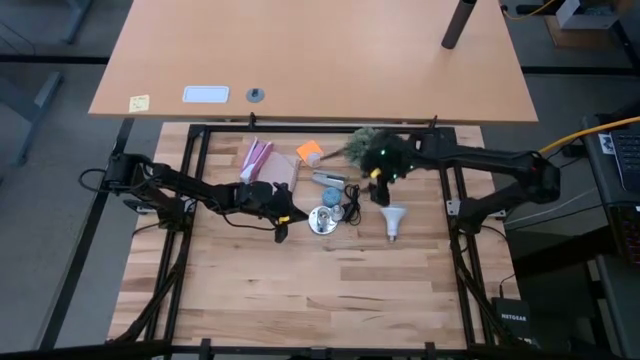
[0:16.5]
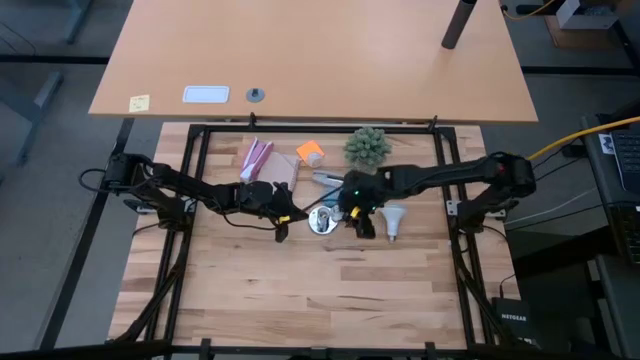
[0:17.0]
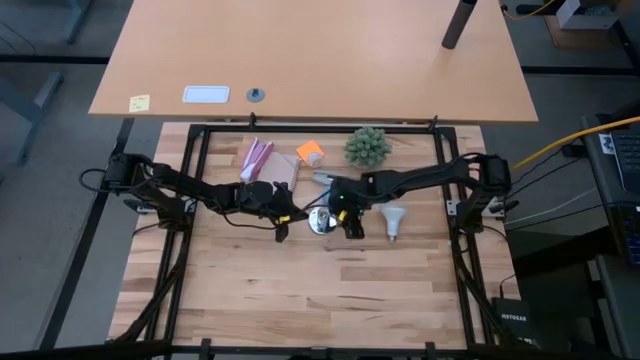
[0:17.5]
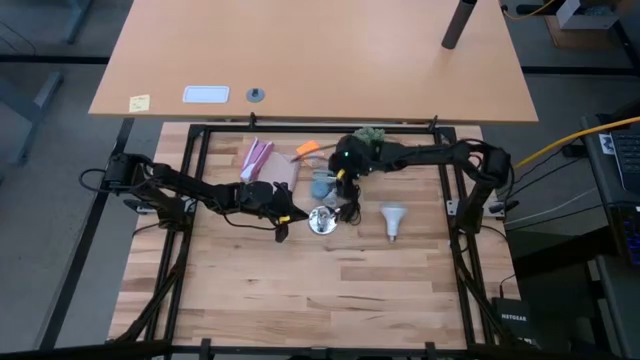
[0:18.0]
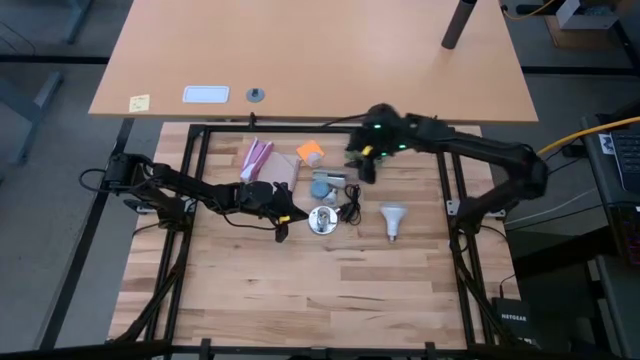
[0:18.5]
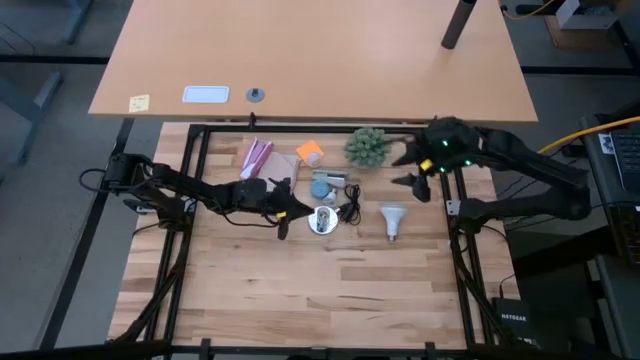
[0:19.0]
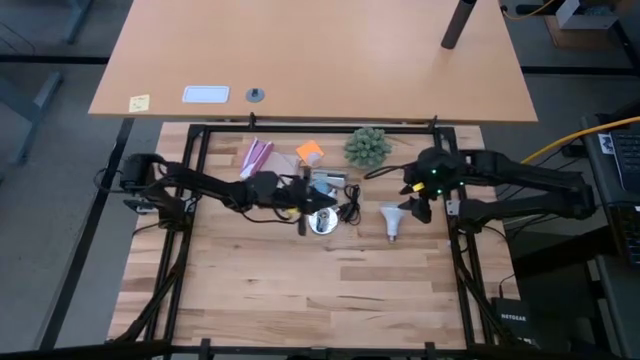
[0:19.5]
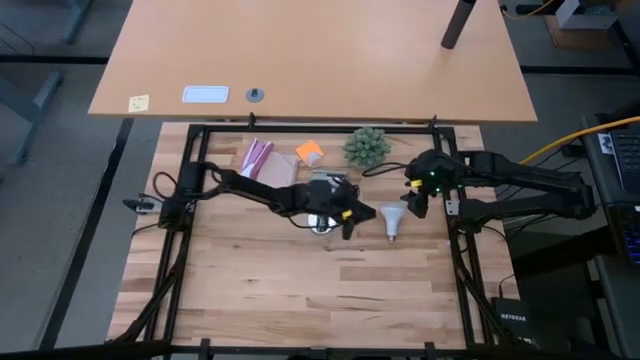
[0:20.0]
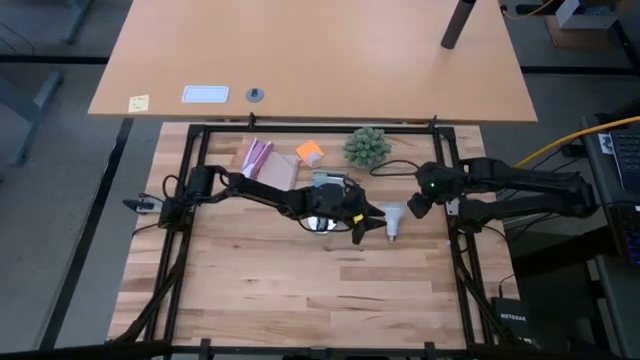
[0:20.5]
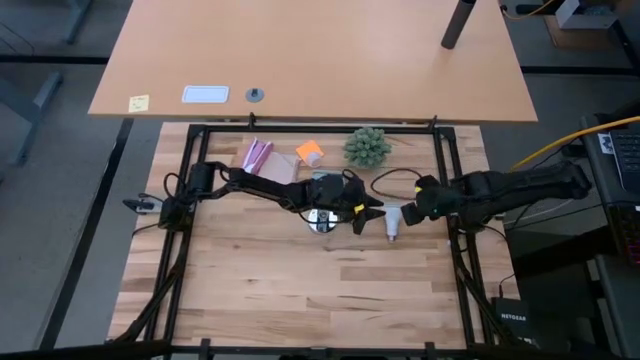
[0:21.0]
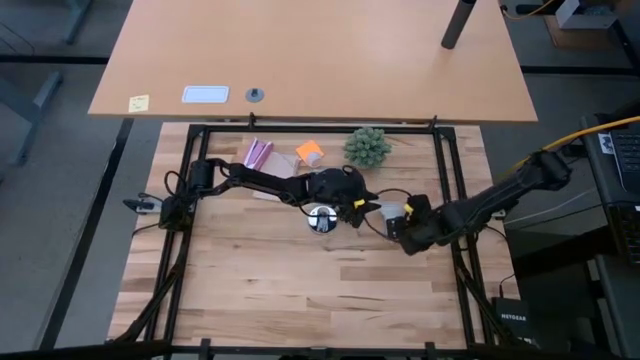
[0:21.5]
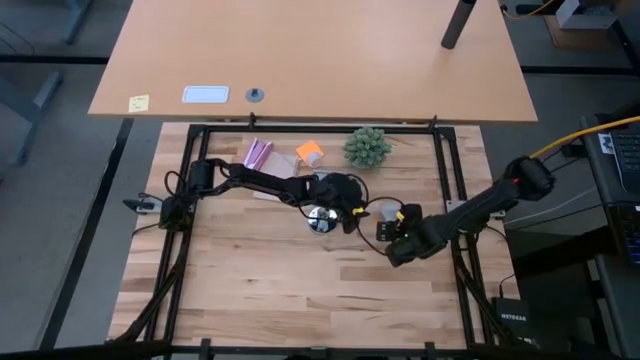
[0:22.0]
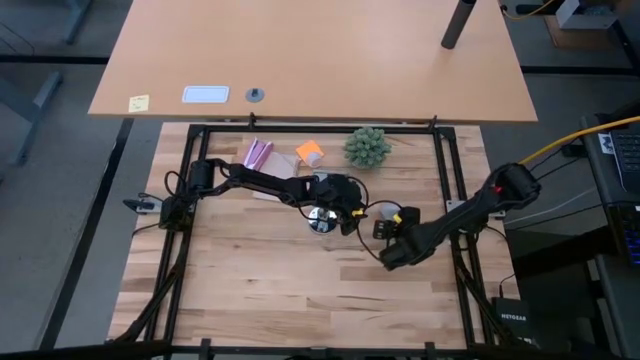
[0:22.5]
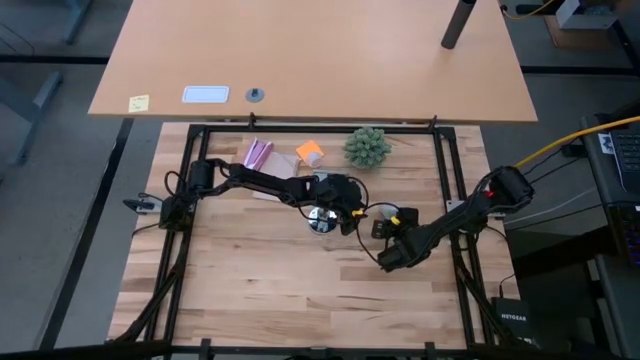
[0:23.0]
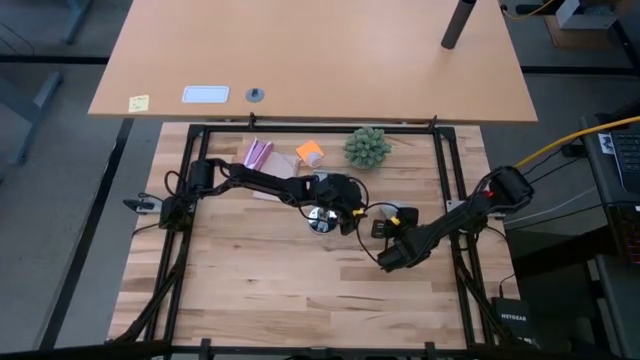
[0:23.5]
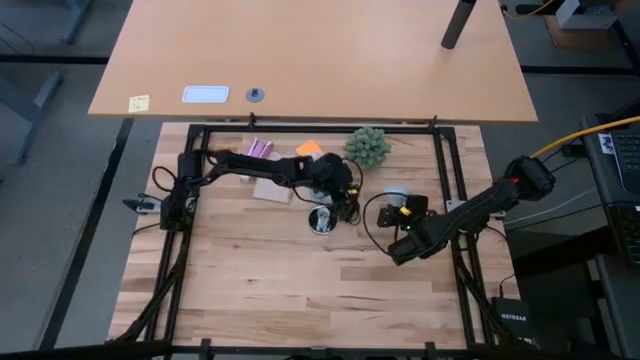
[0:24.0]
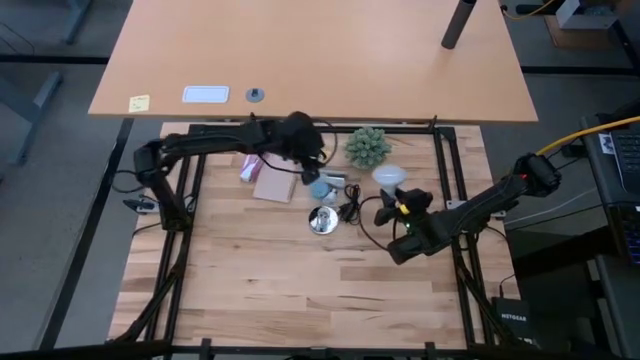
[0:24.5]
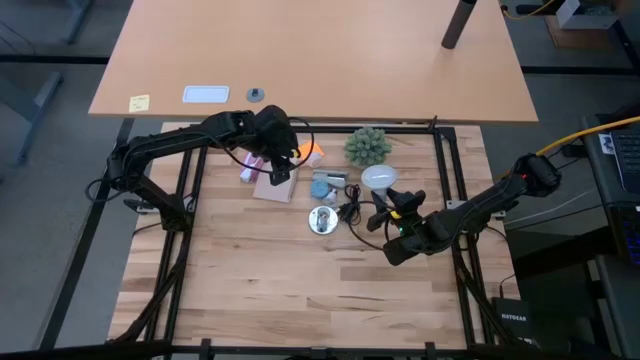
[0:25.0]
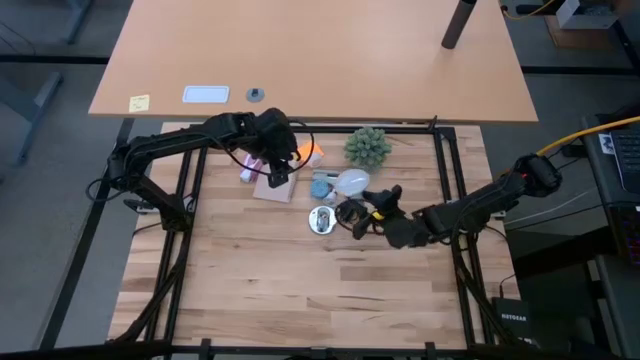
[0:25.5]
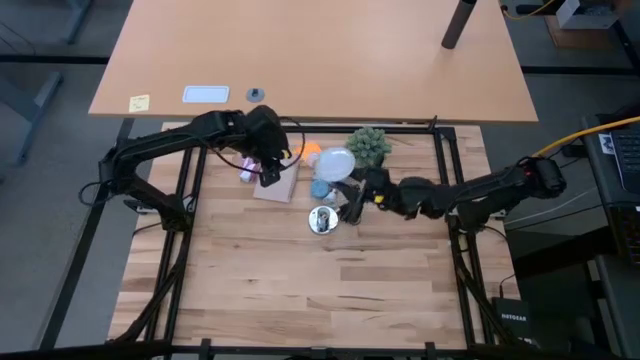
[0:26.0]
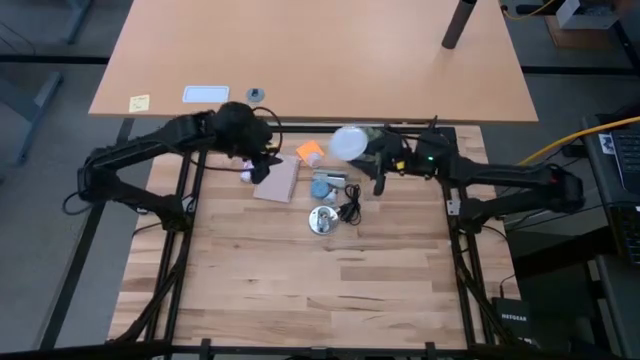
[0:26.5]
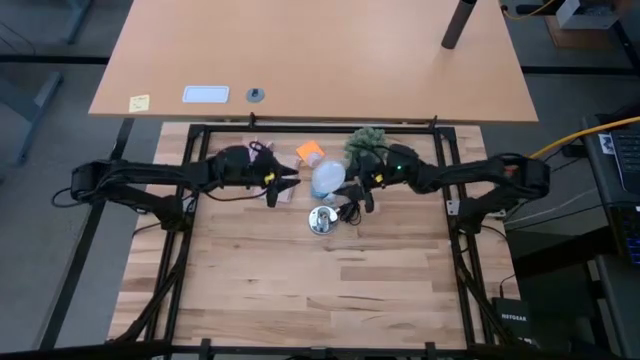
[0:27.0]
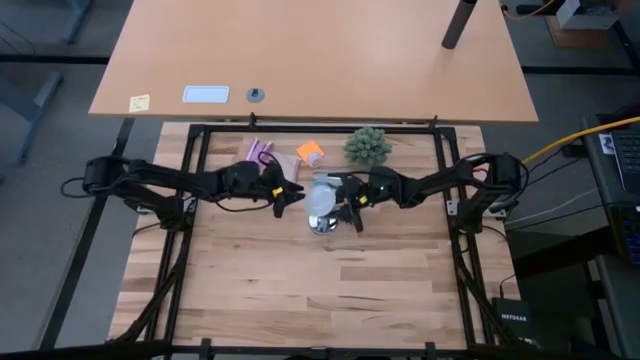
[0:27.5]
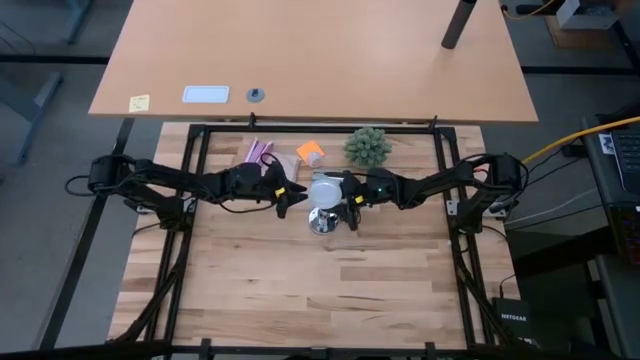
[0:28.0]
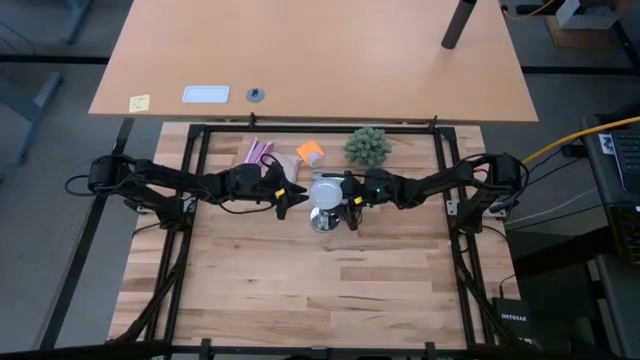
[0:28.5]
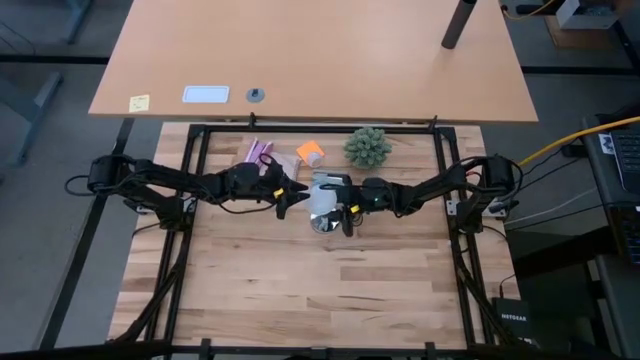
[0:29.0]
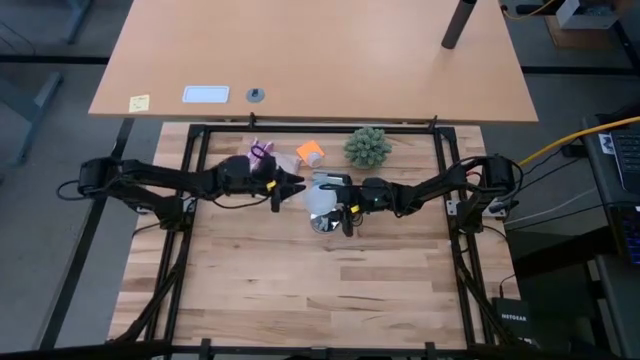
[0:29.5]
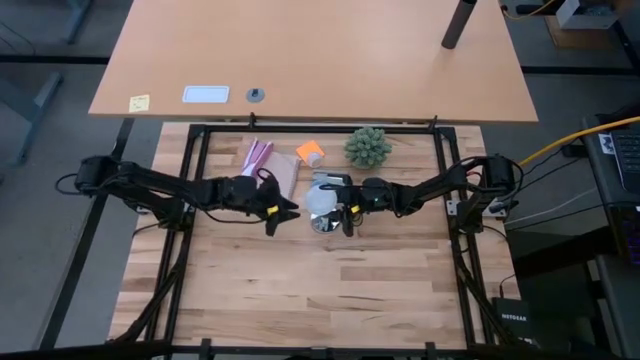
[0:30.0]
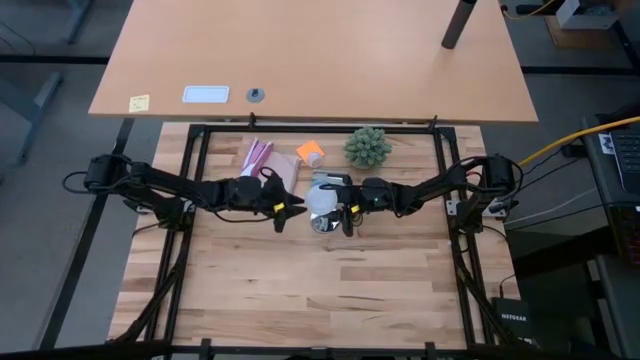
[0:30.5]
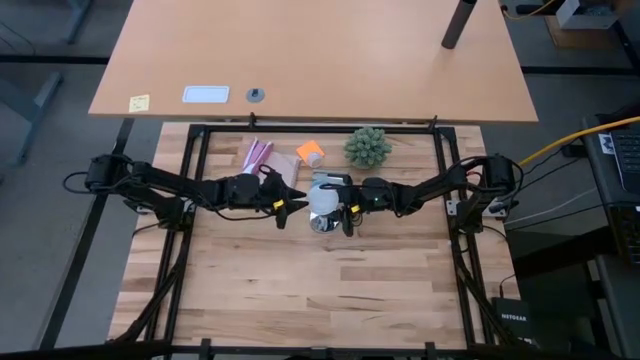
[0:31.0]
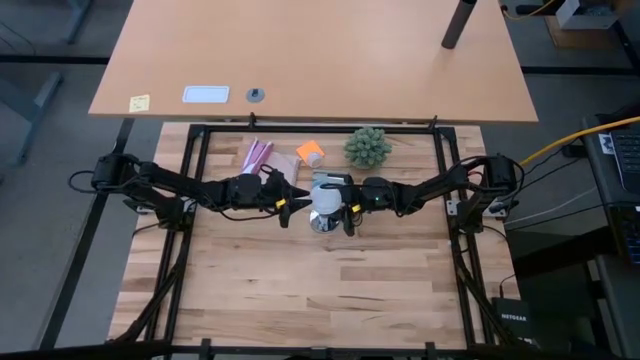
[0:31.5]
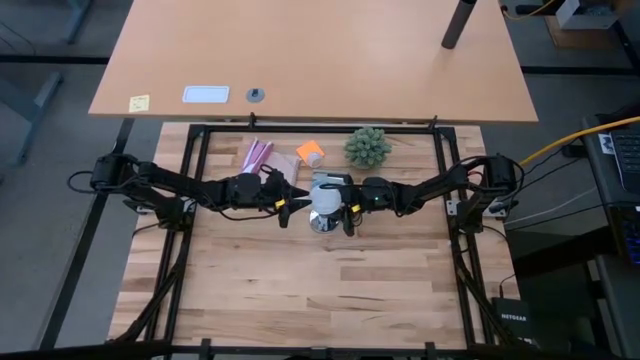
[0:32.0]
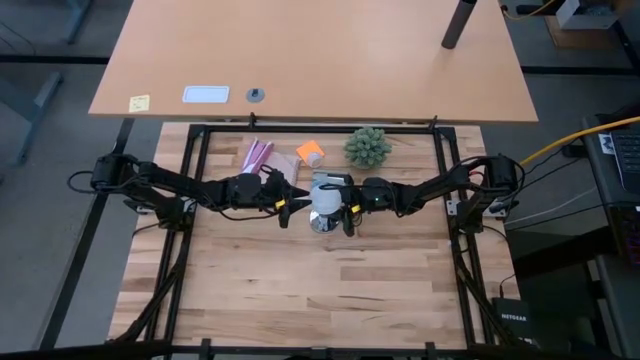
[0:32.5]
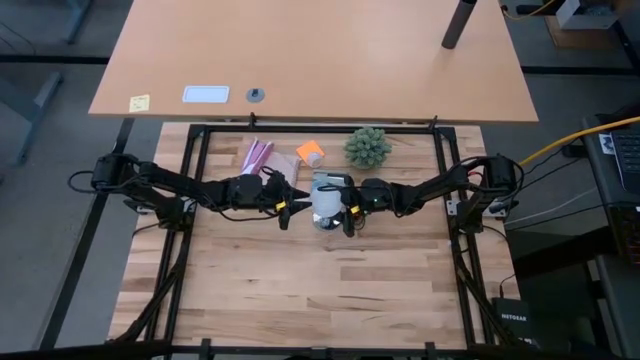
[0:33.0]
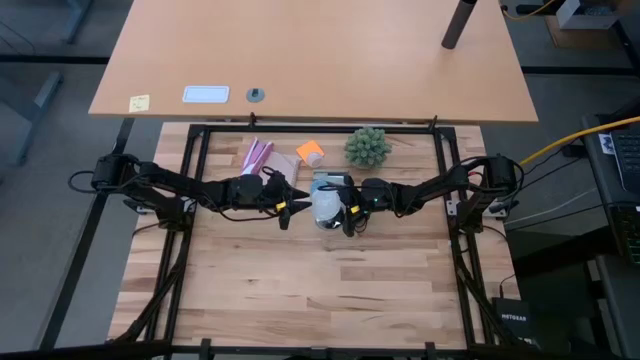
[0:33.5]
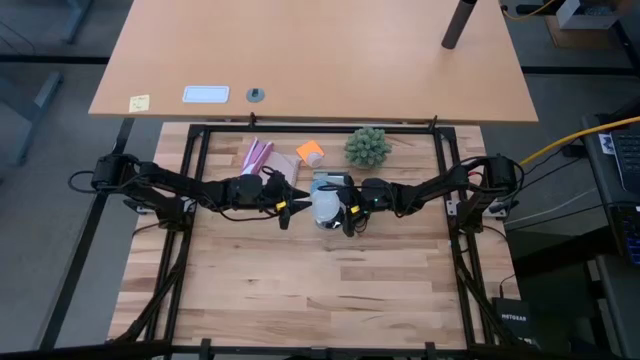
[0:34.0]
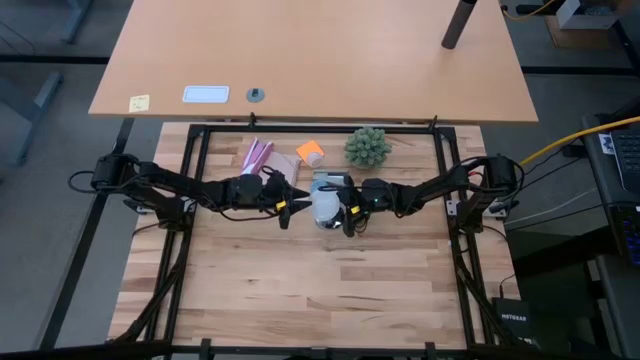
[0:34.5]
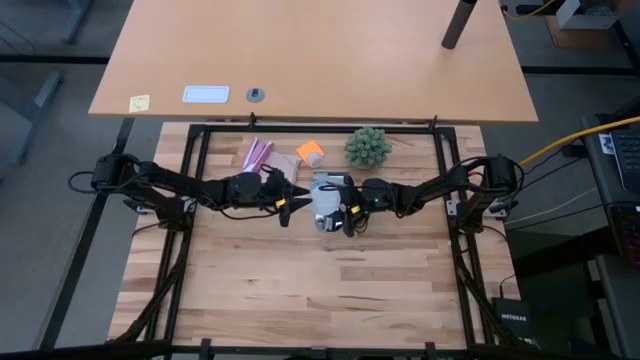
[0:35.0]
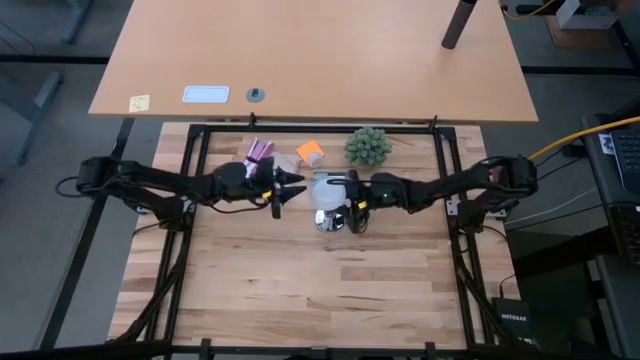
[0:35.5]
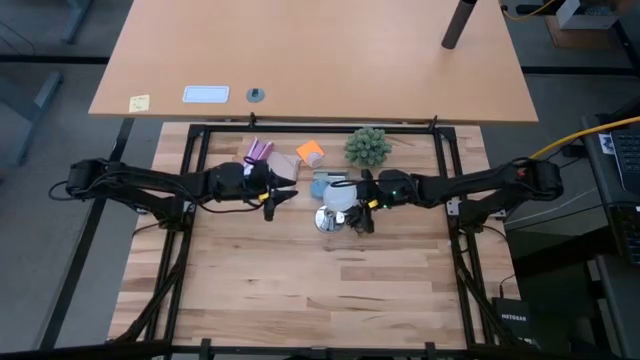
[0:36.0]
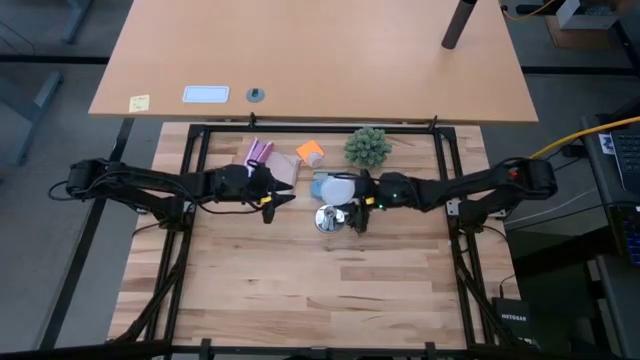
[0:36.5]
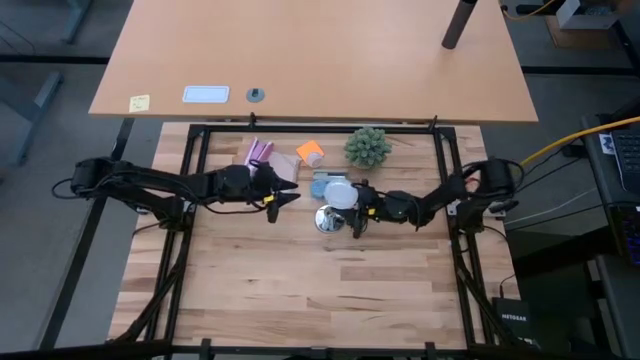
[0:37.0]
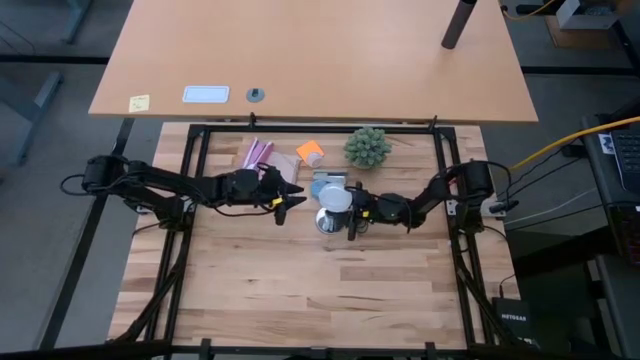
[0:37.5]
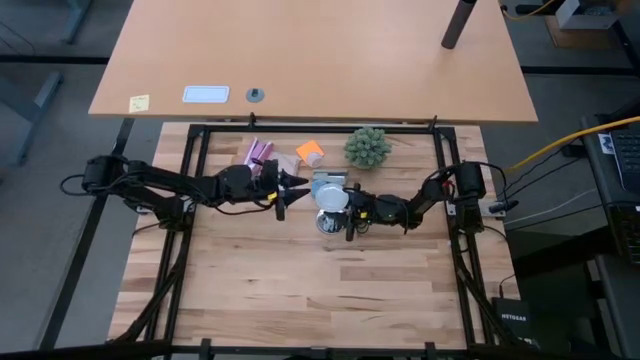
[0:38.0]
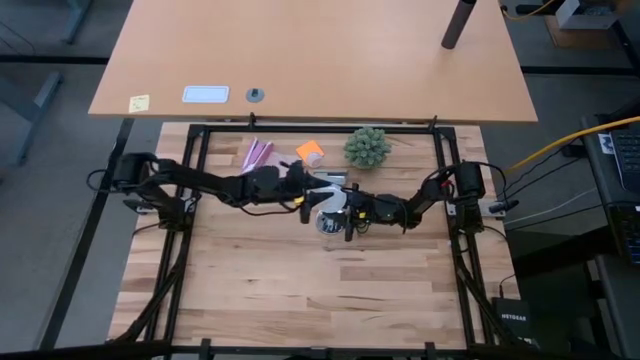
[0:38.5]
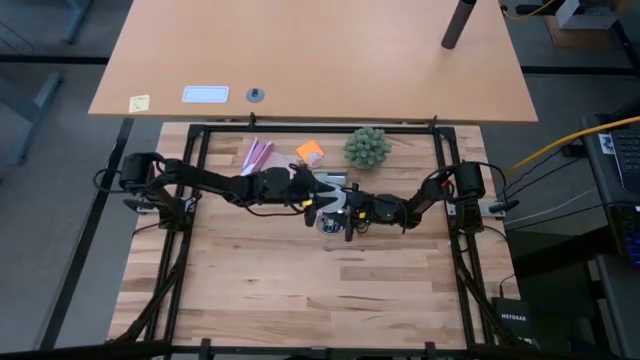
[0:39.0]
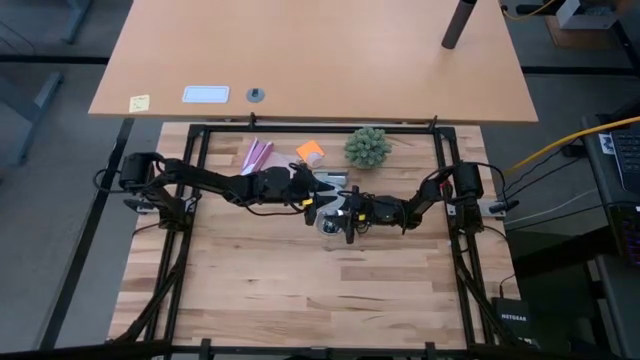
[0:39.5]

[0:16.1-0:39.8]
Task: Screw lightbulb
Insert the lightbulb into the silver lamp socket
